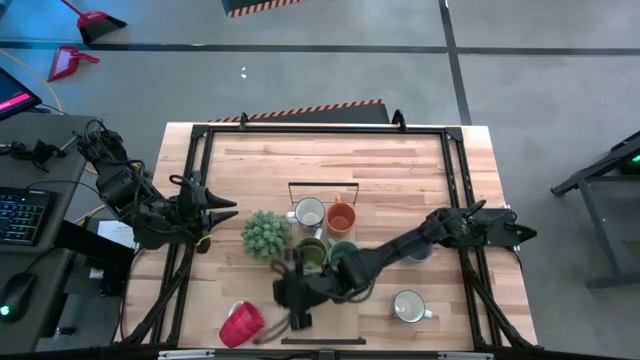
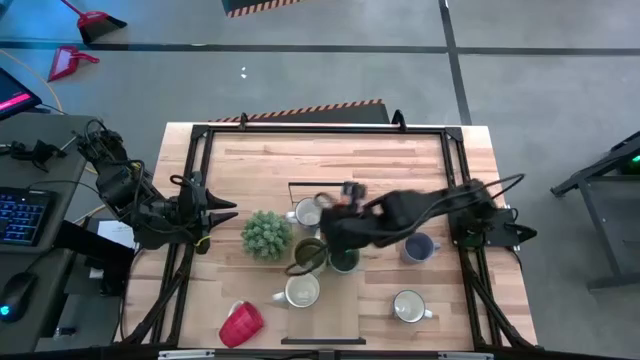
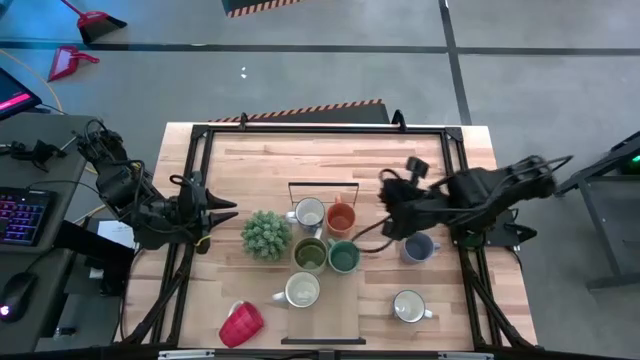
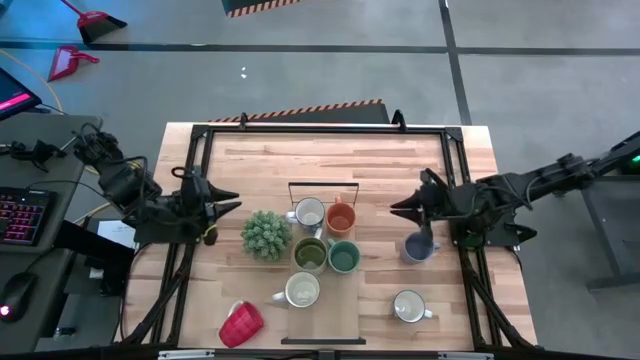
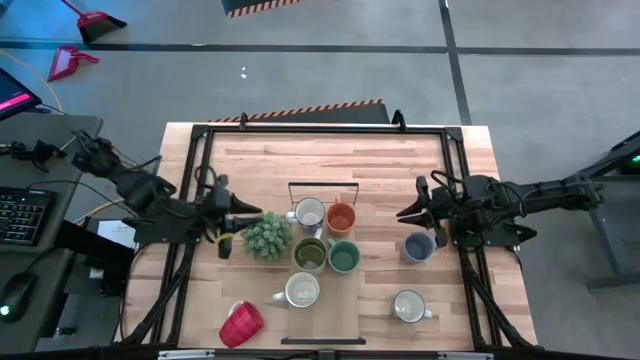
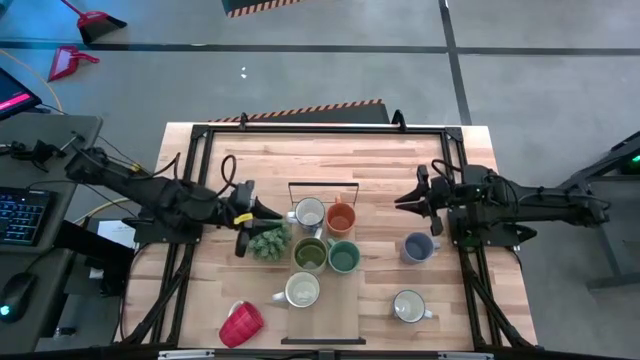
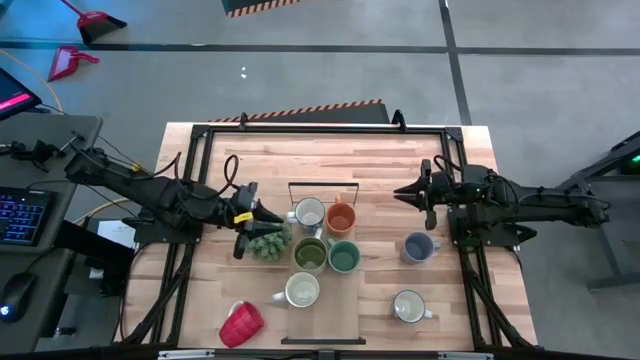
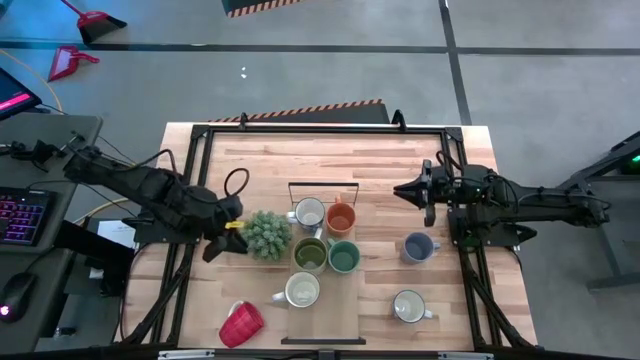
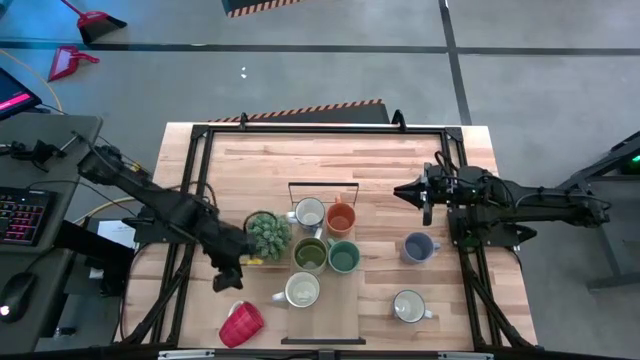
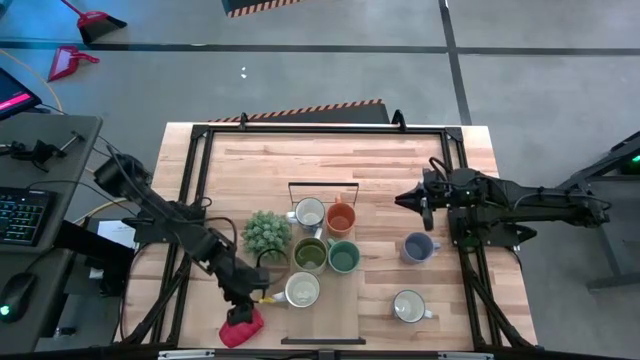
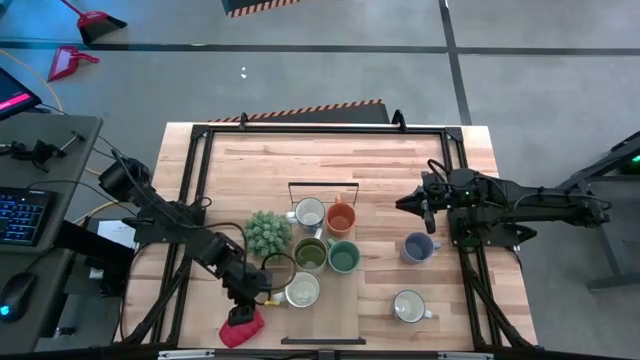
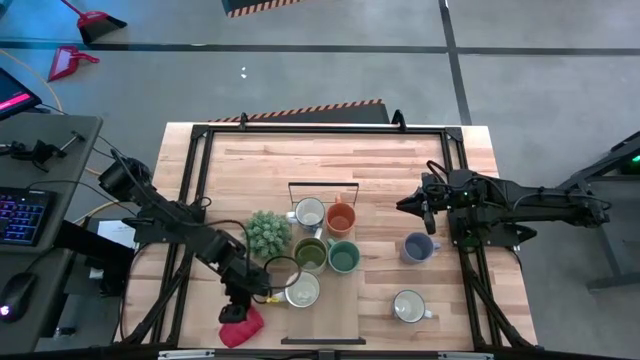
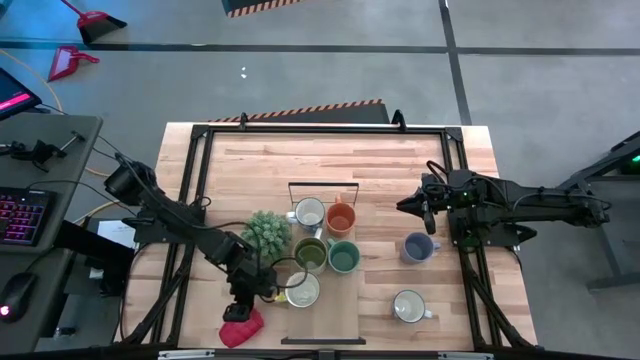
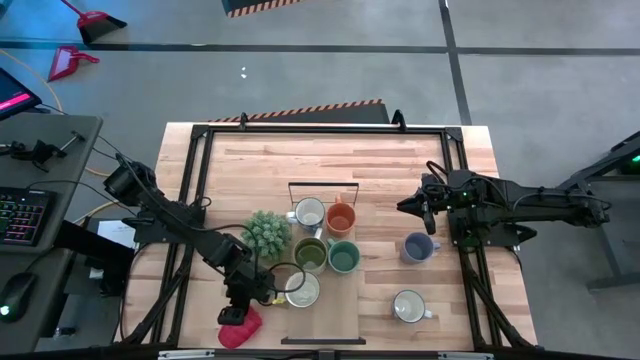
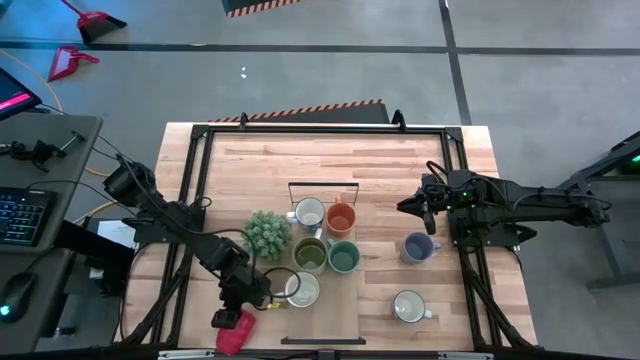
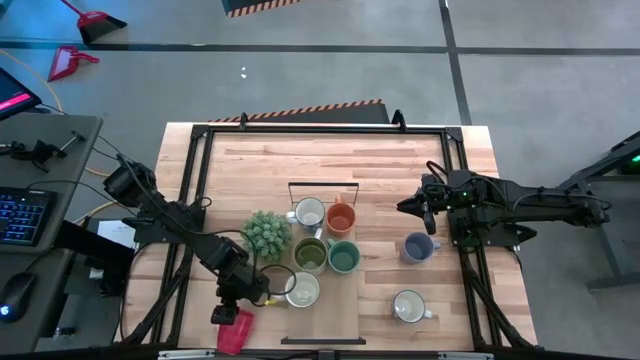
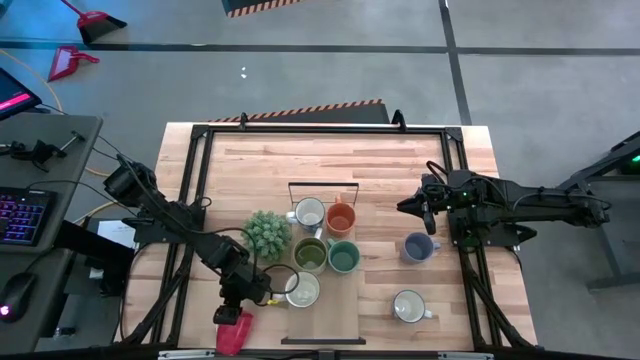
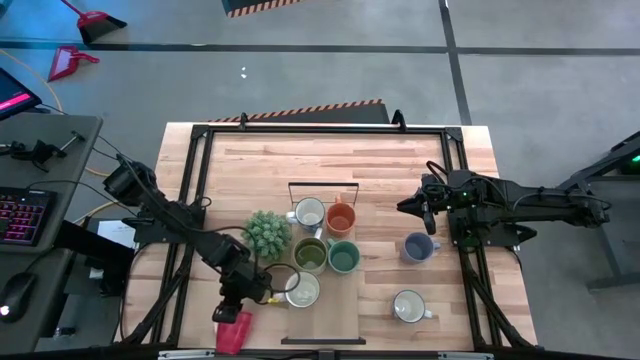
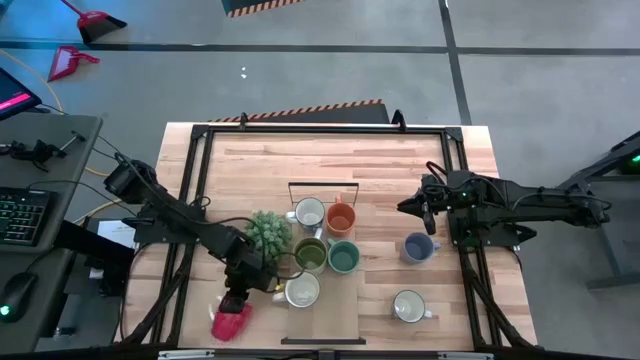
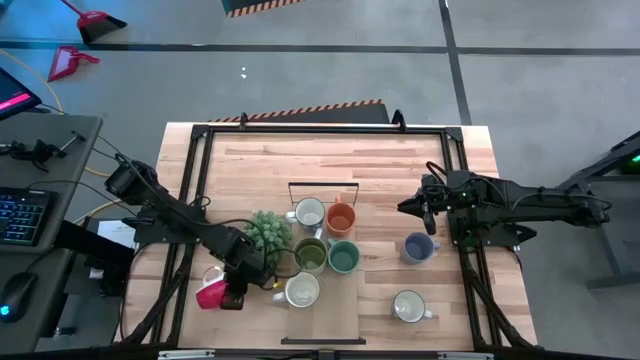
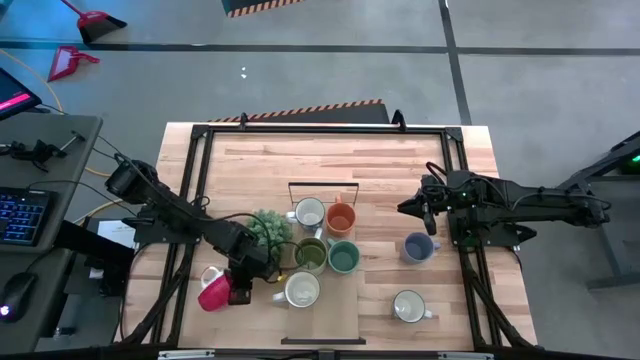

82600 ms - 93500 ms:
Task: Place coffee mugs
Adjust the red mug on the table

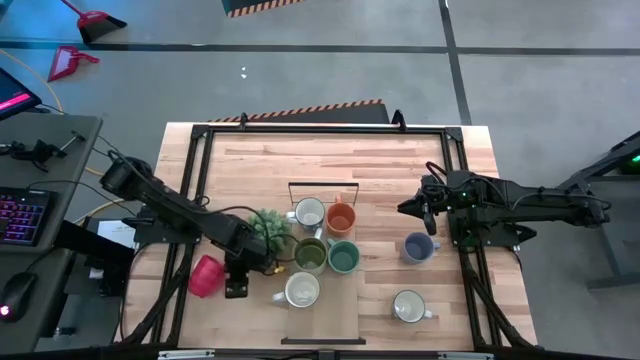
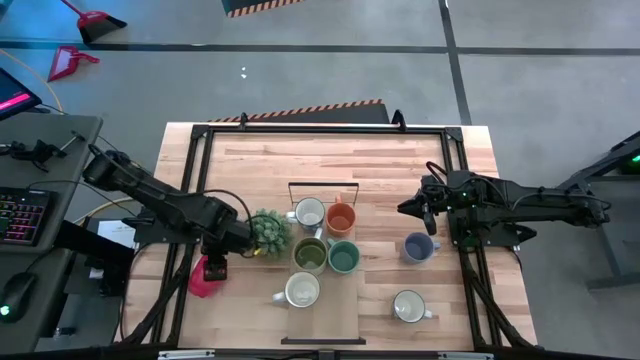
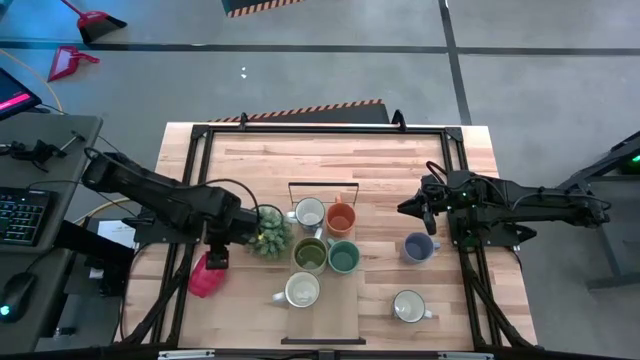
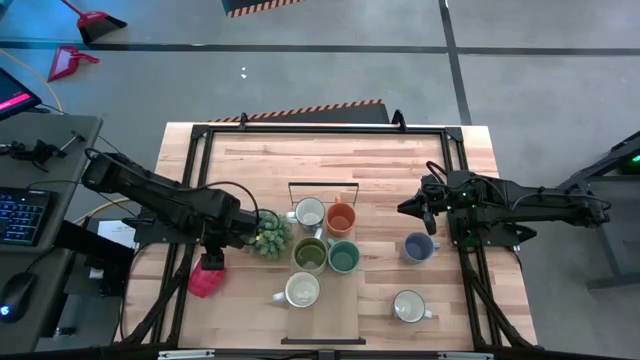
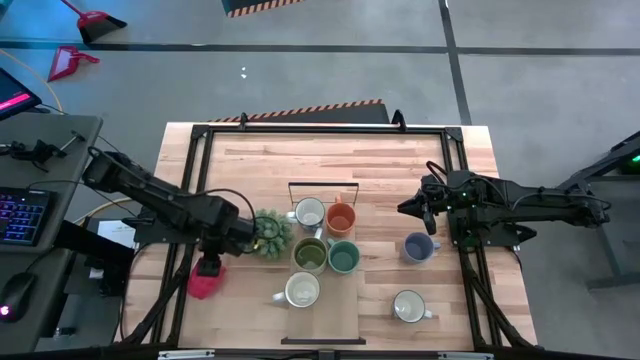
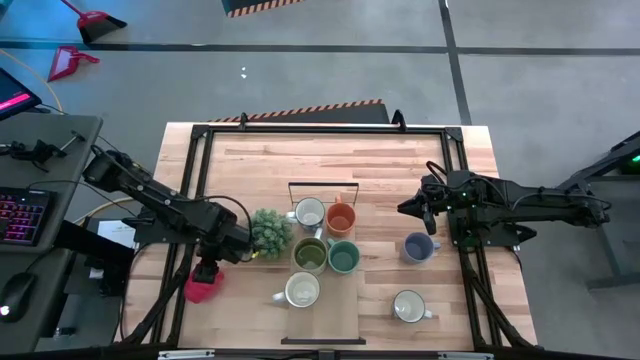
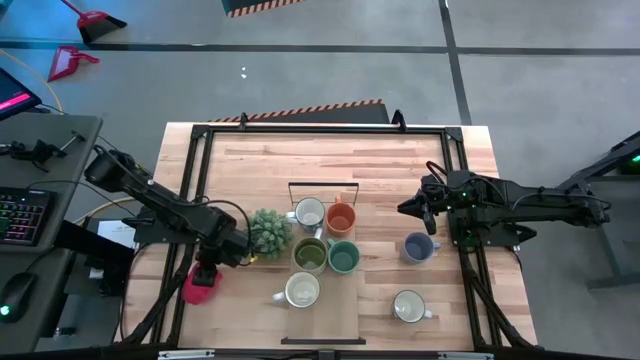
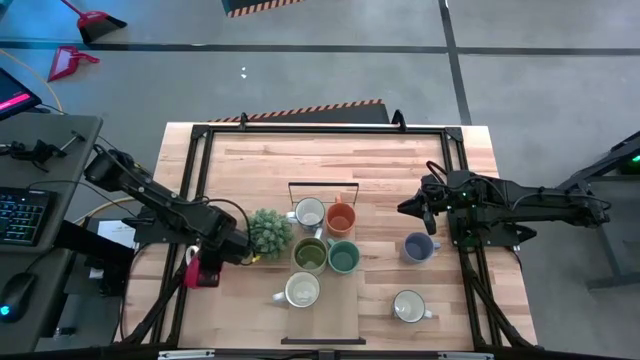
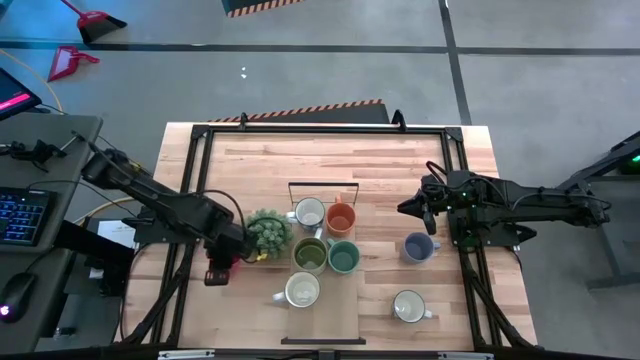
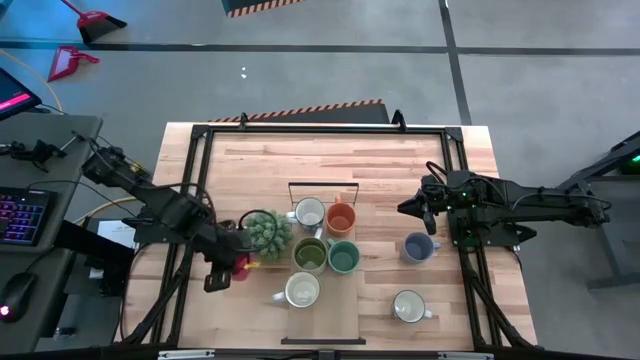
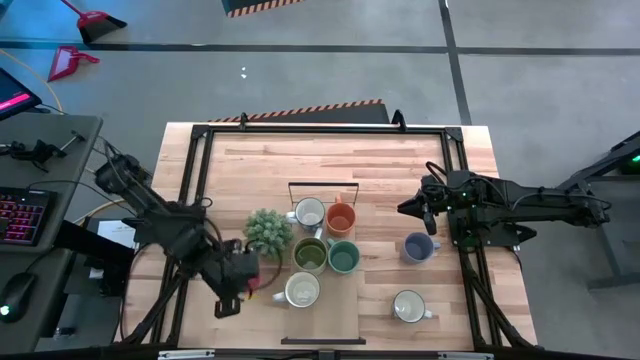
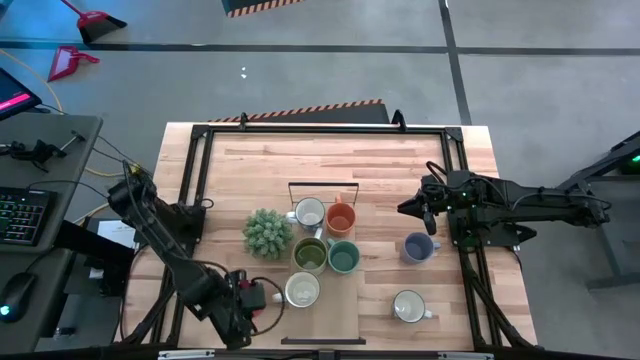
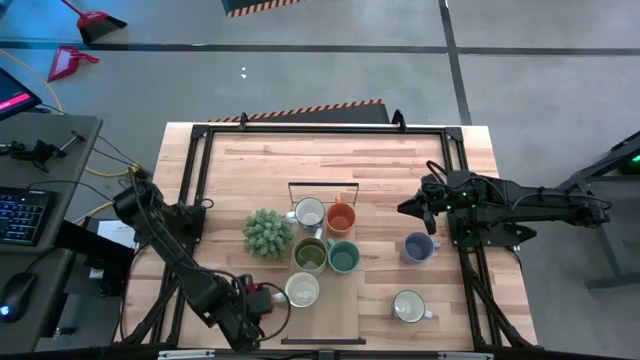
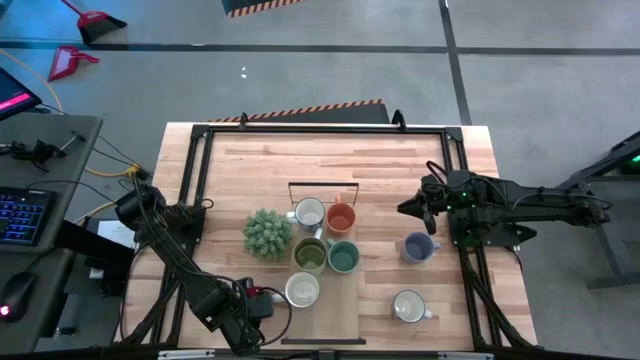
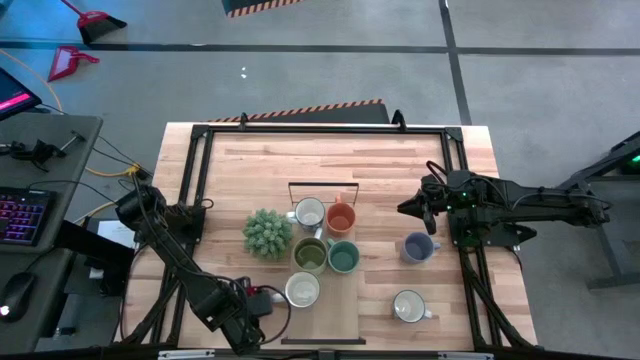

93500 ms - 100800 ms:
Adjust the red mug on the table

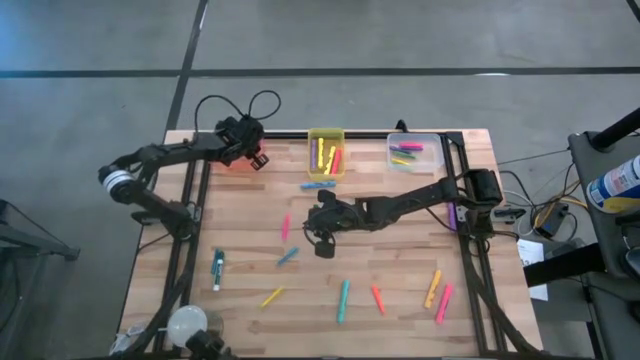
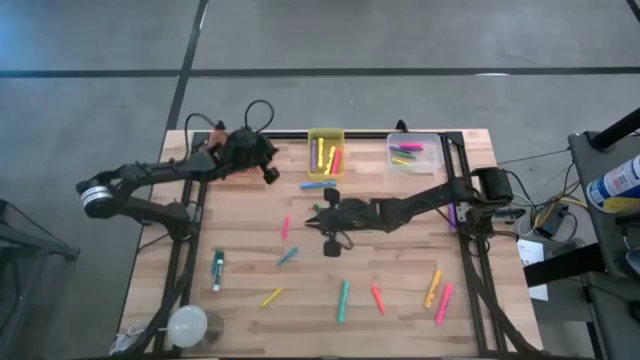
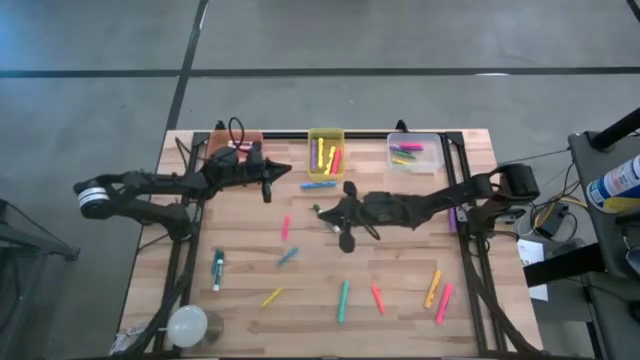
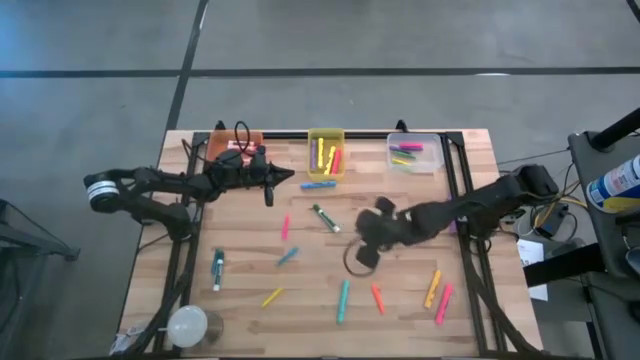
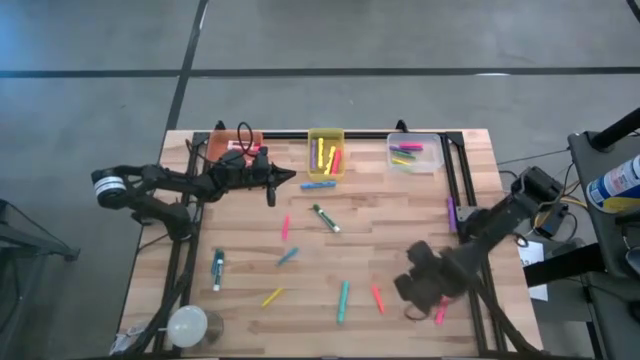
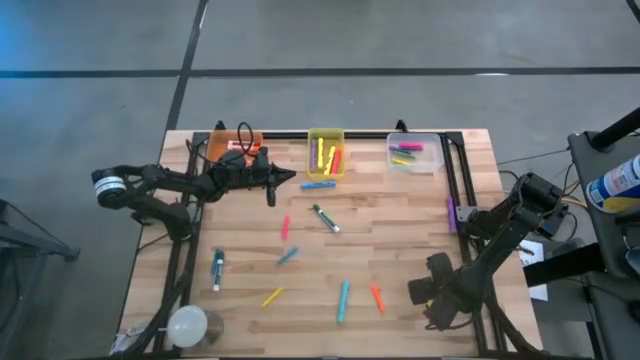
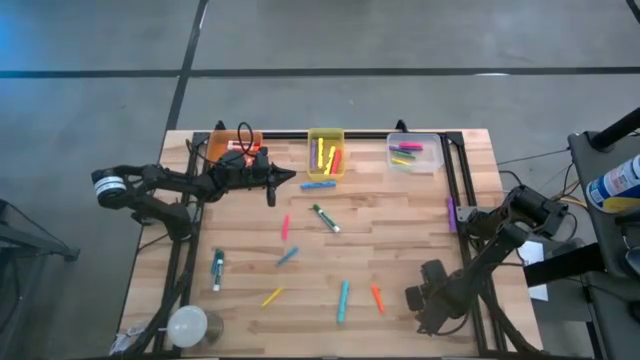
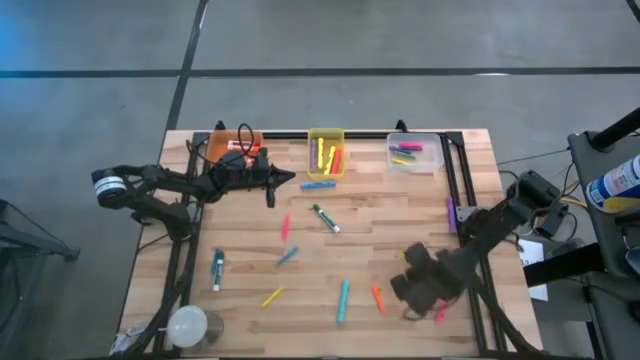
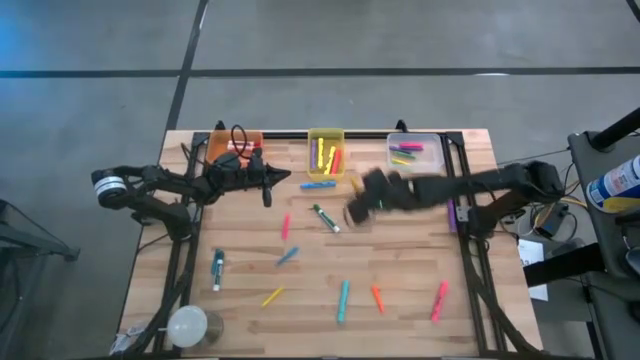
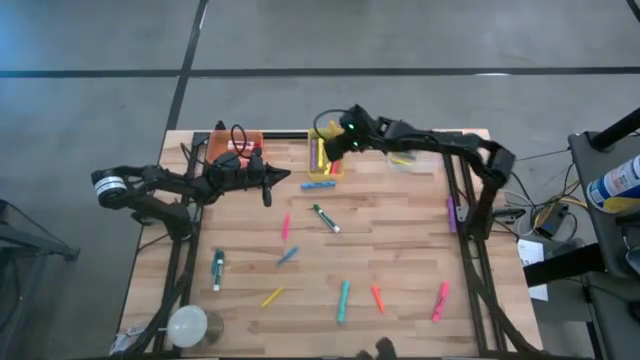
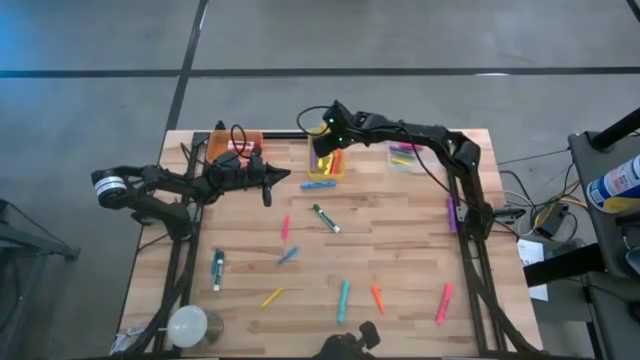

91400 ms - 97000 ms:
Task: Pick & Place Markers
Put the dark yellow highlighter pen into the yellow bin
